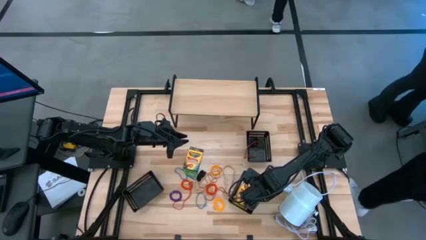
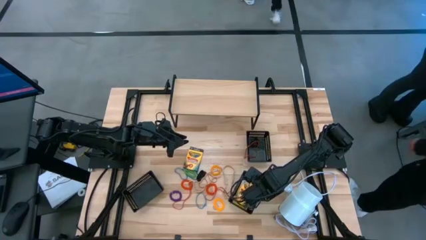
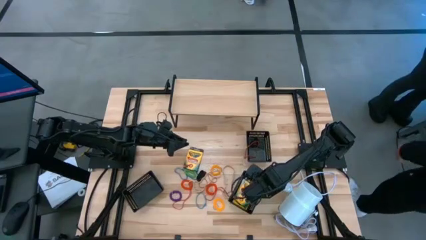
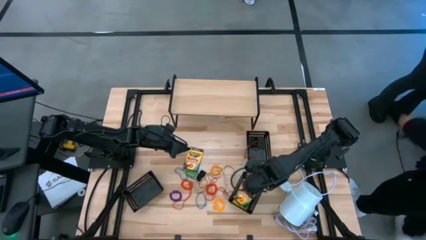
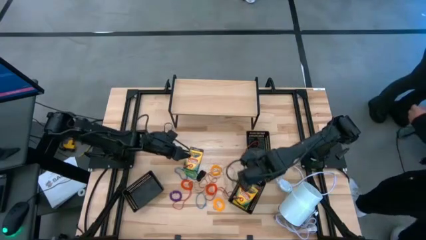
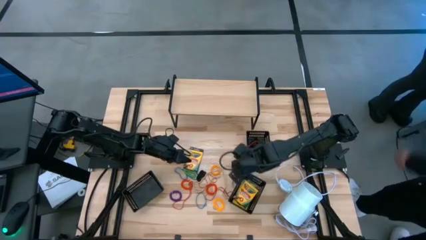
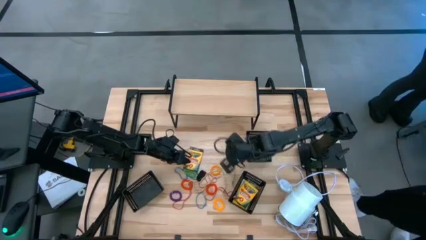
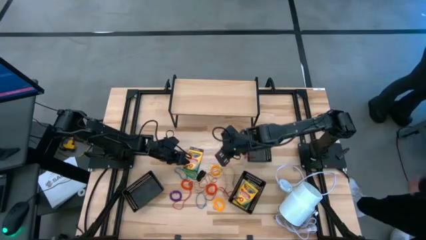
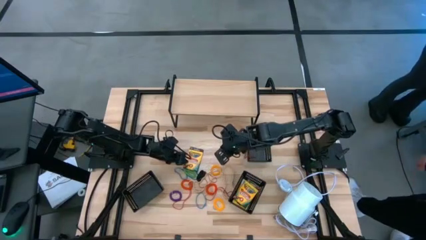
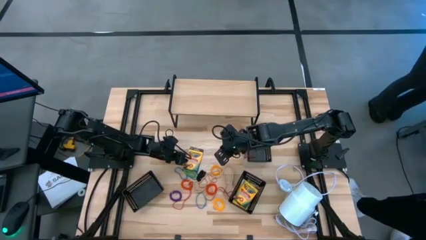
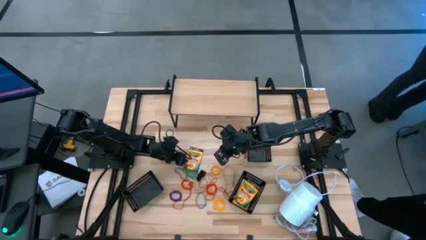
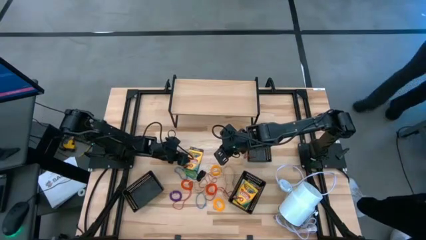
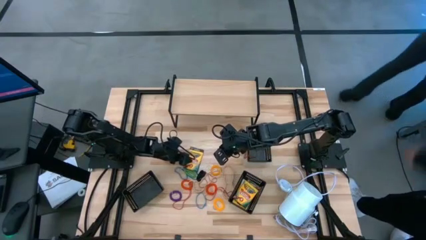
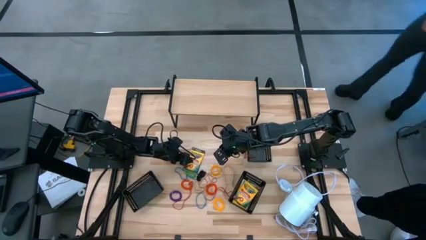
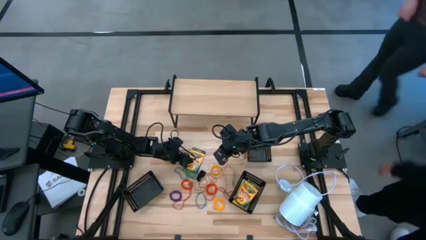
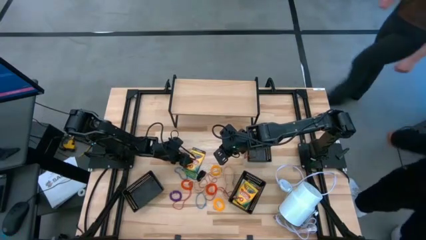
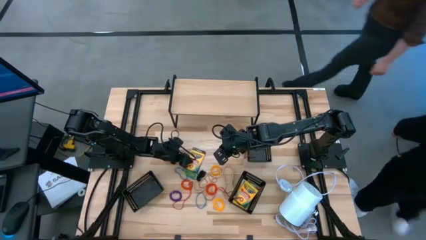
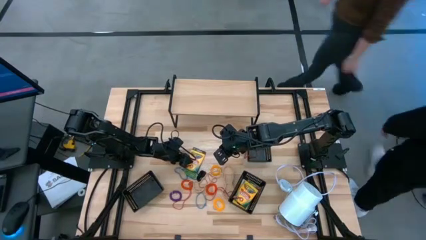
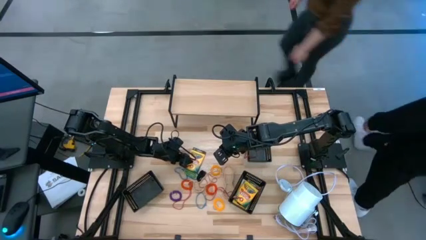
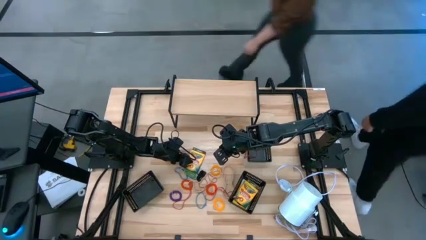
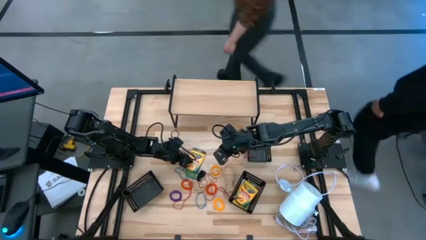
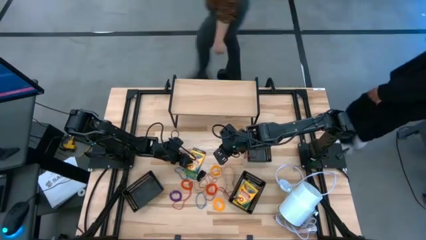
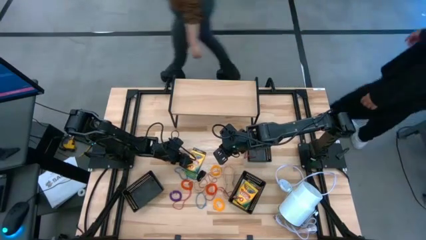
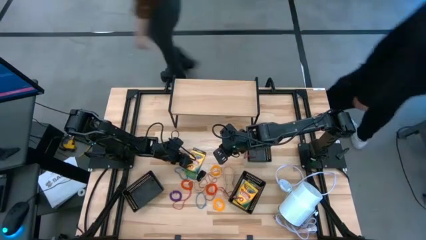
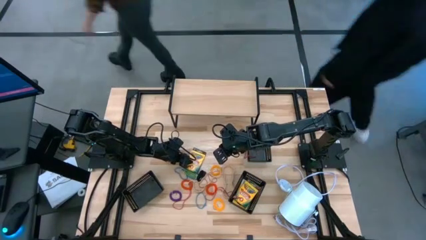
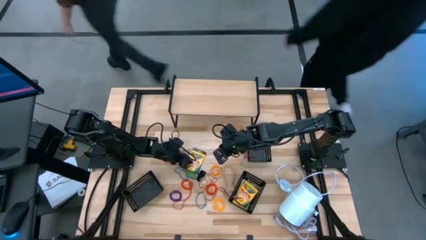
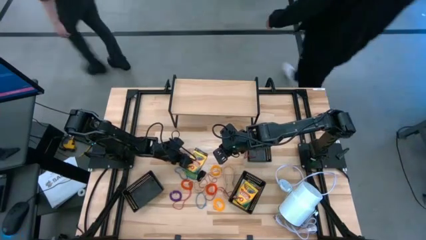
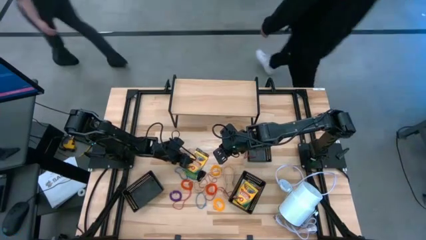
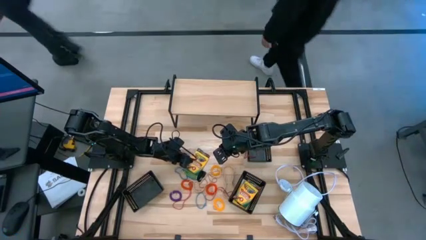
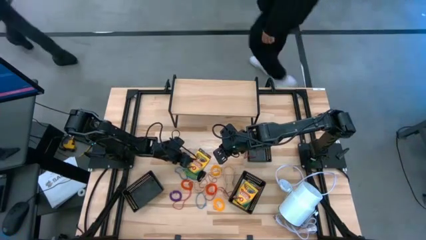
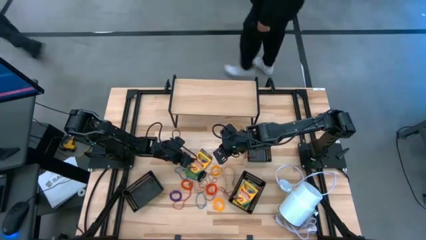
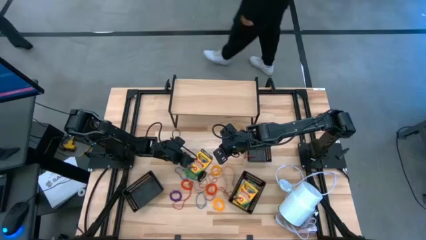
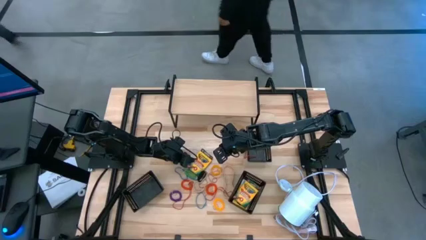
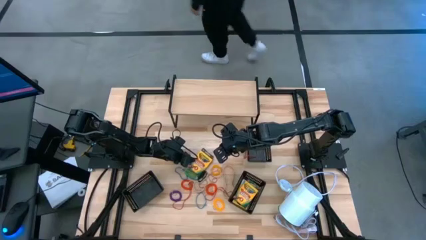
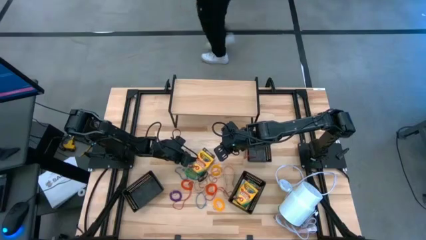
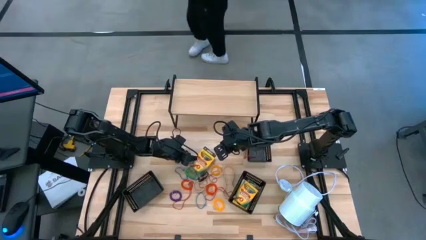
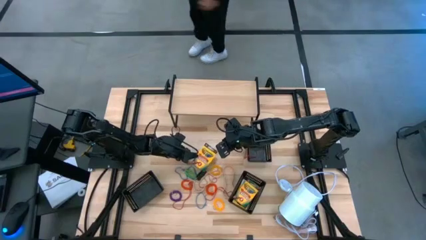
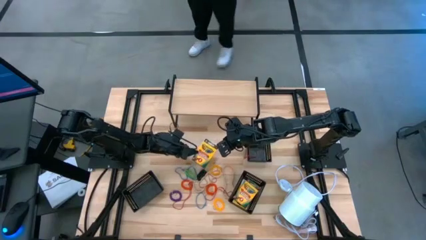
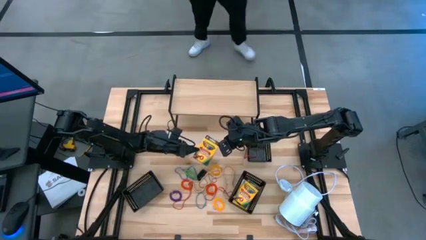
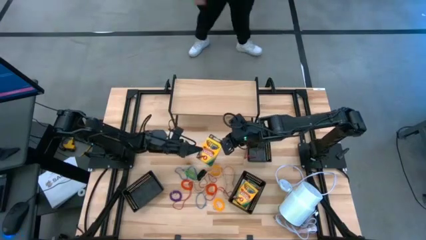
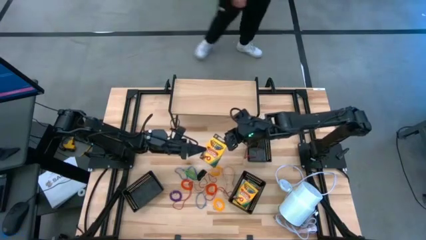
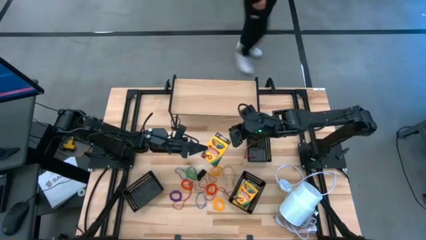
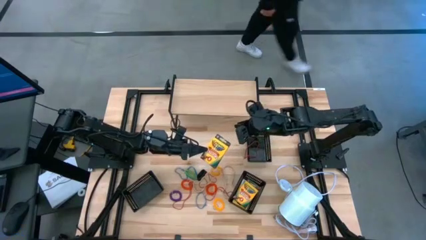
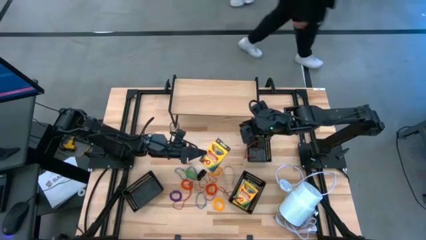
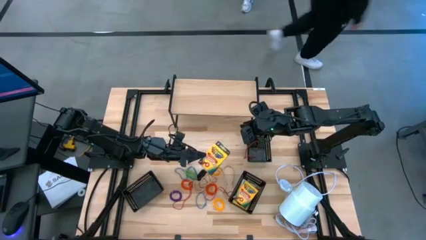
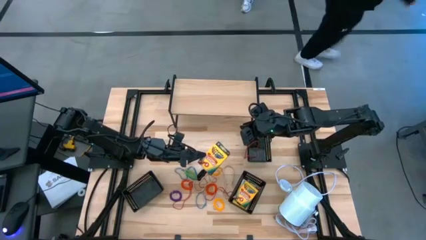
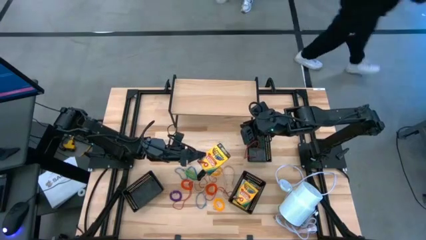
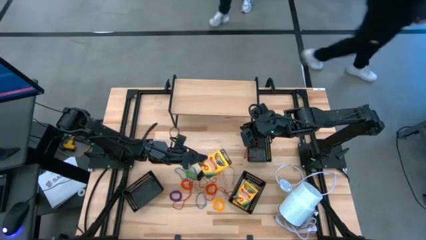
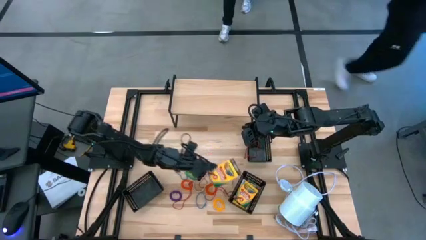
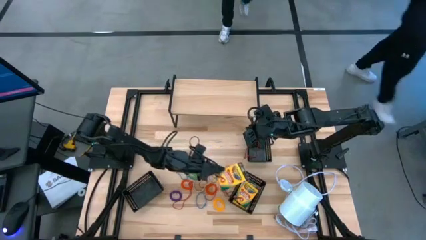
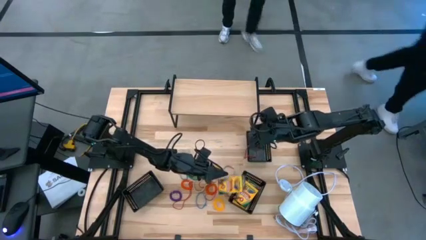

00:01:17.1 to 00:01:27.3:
Task: Pick & Place Office Desk Supplies
Put the crayon box into the bottom right black bin

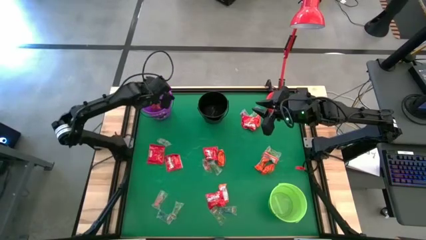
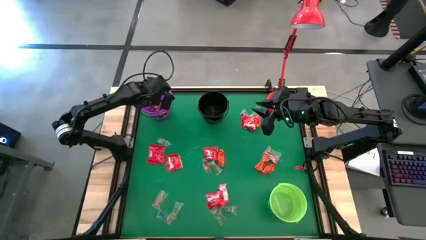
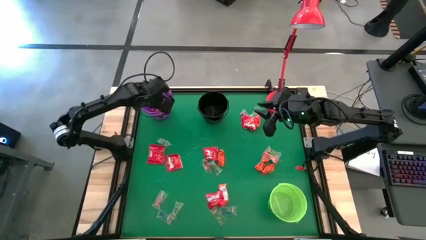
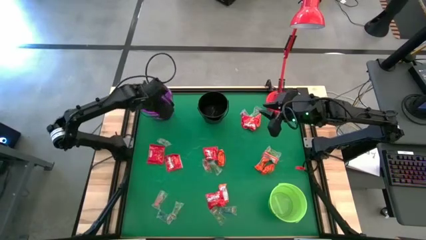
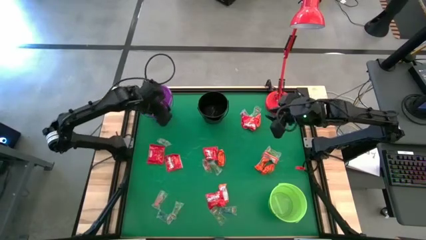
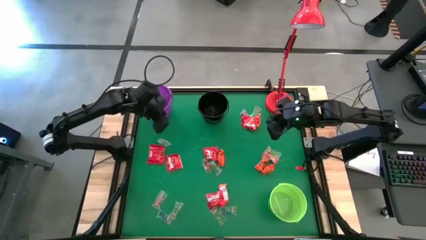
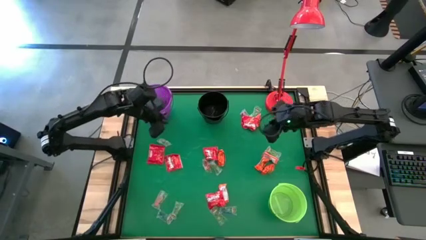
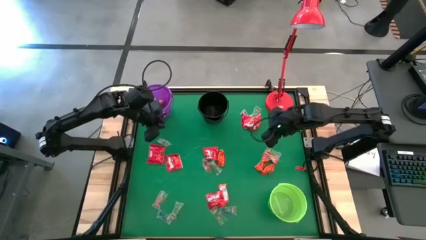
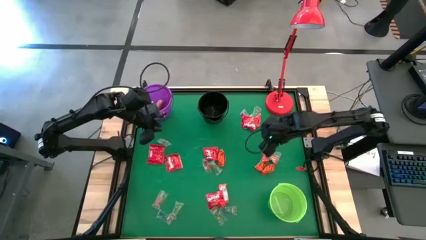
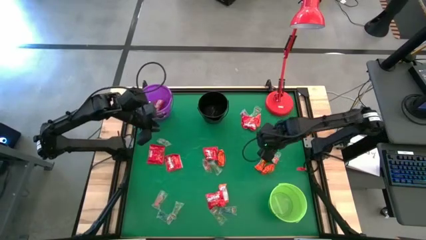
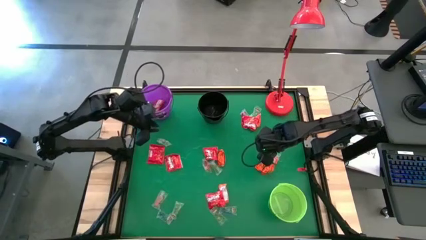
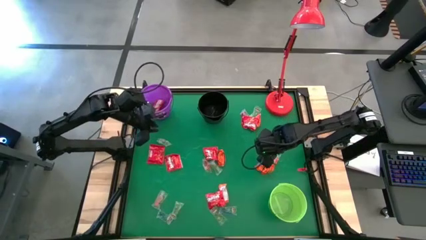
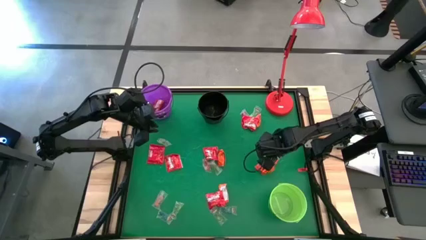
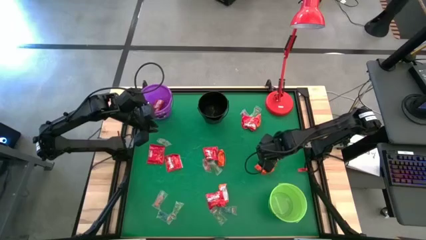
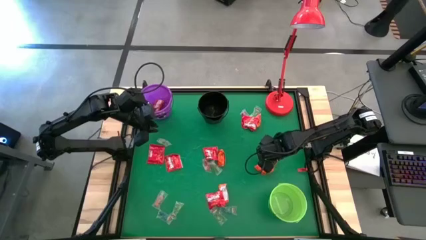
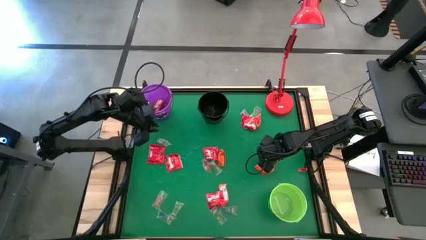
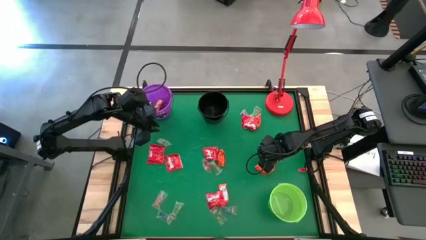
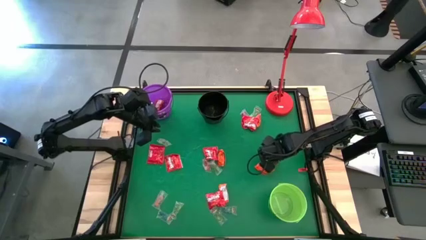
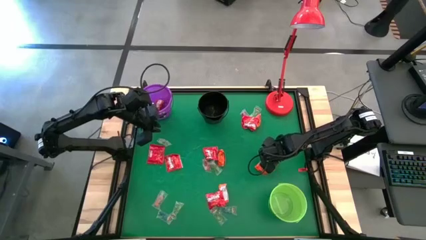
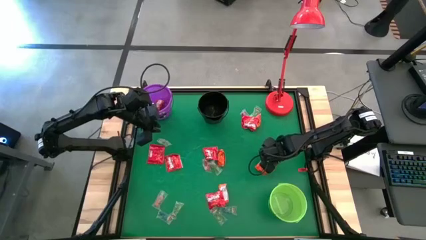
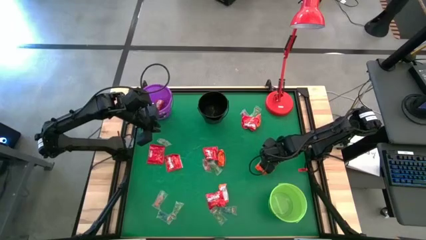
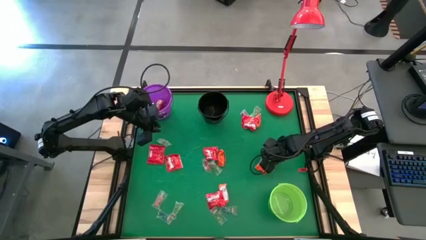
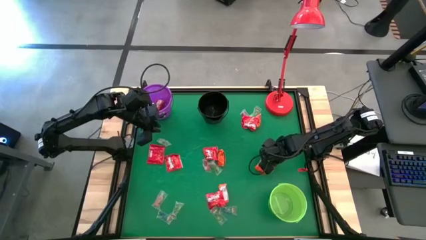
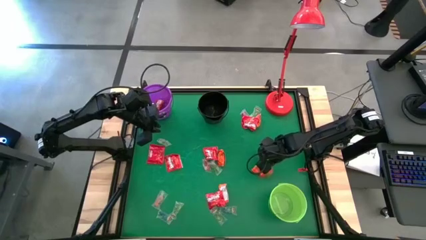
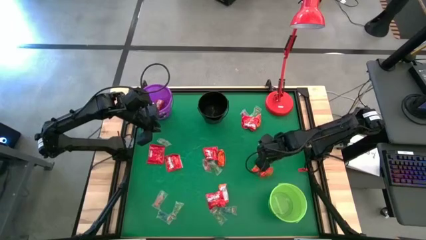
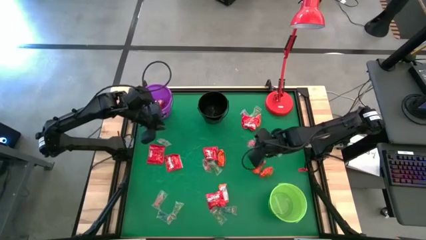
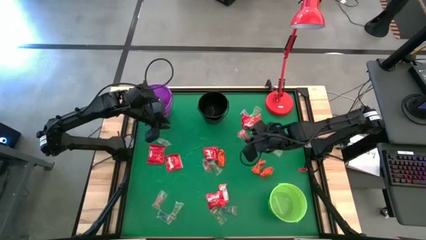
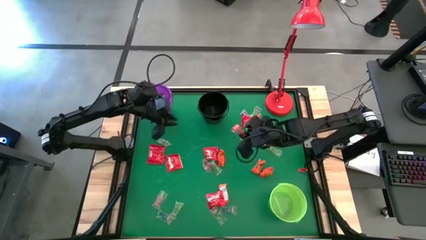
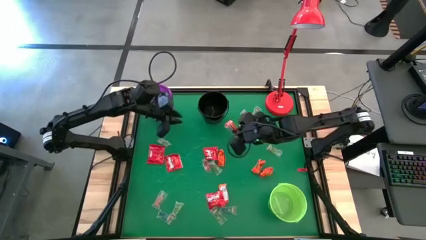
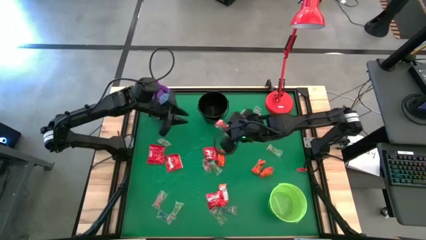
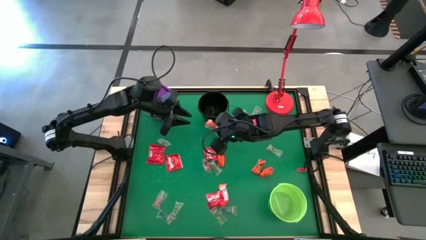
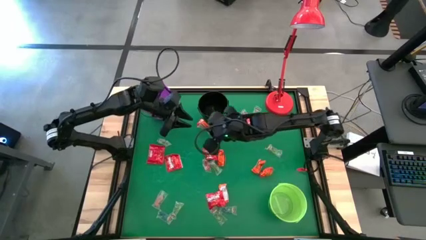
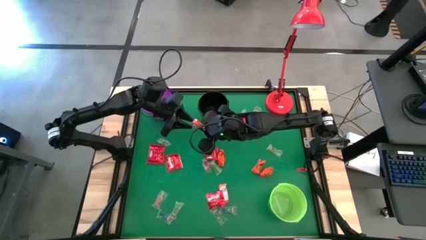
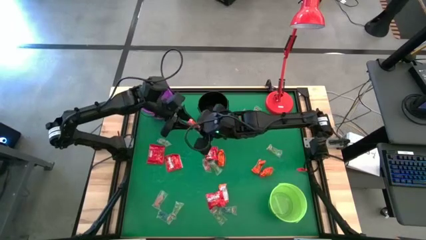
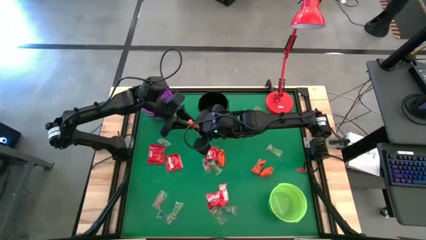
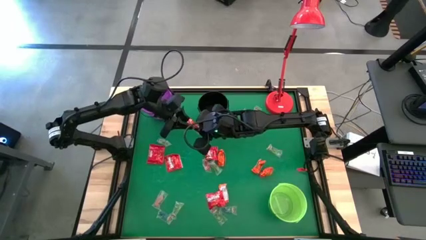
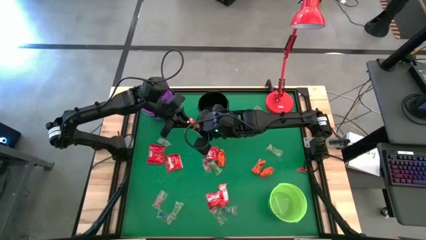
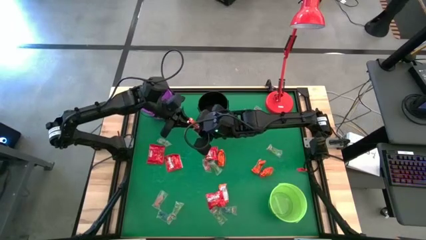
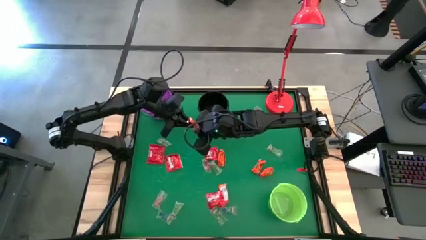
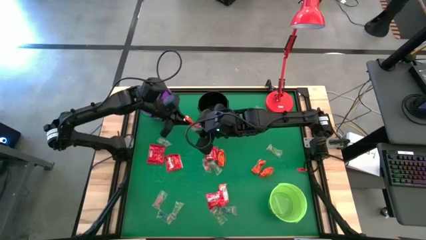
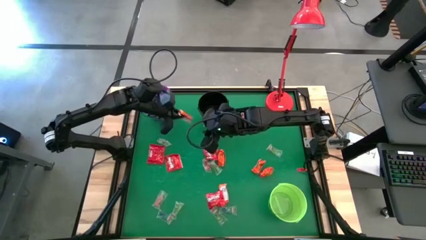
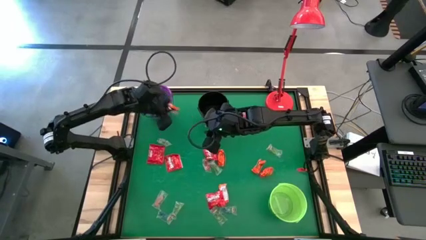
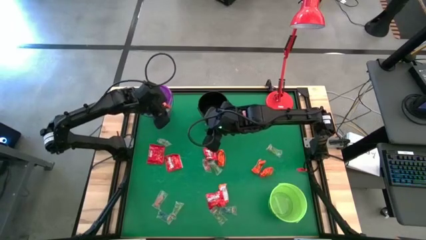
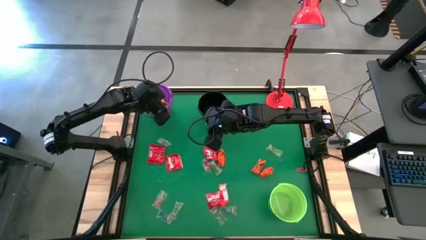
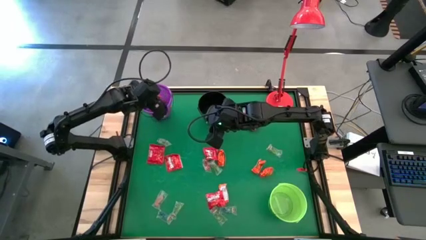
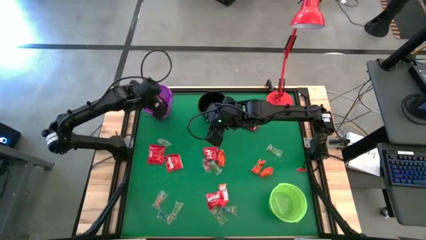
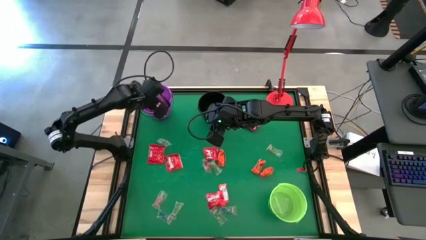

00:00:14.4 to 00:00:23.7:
Task: Sort candy
Put the orange chocolate bar into the purple bucket
